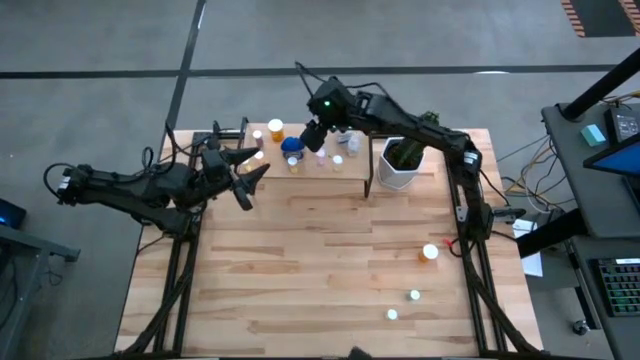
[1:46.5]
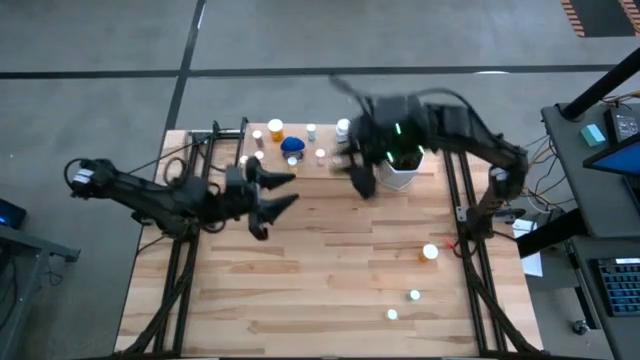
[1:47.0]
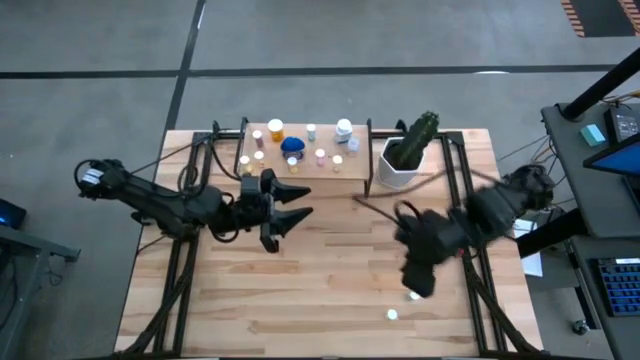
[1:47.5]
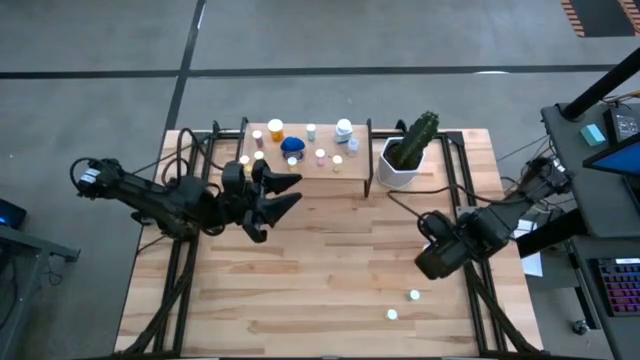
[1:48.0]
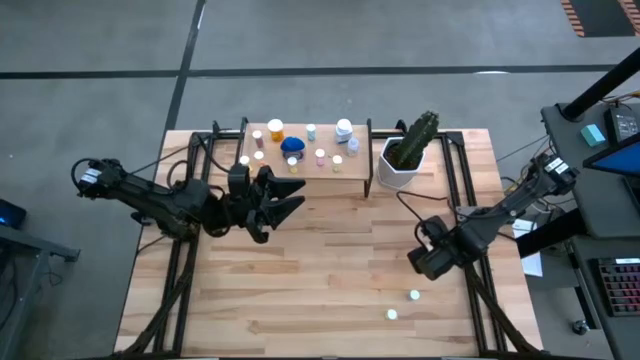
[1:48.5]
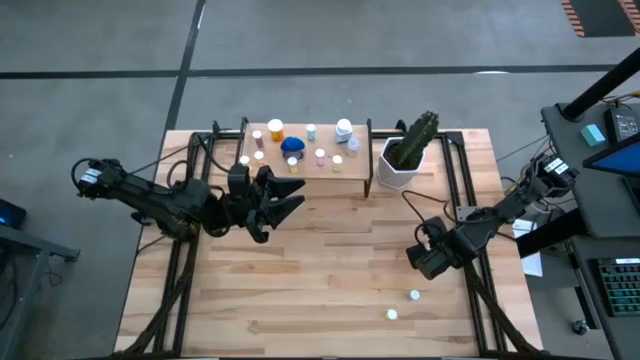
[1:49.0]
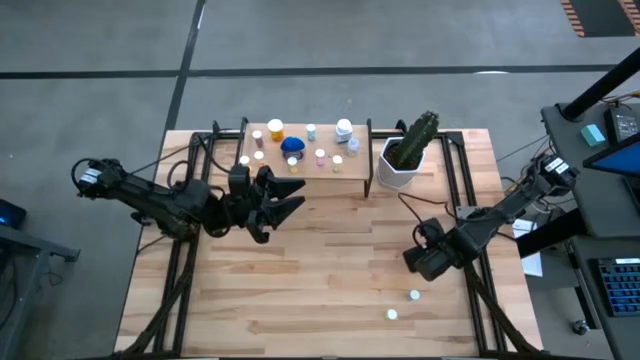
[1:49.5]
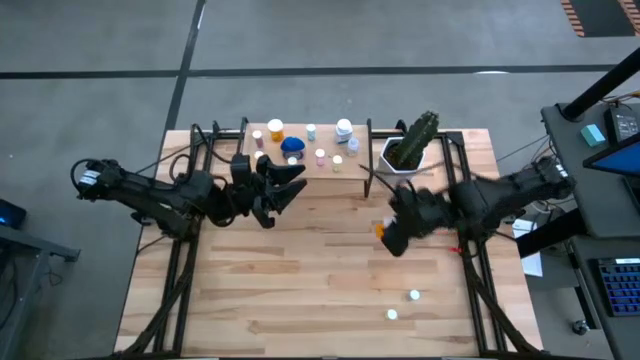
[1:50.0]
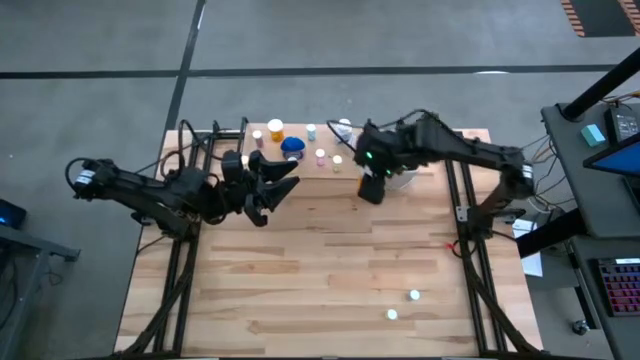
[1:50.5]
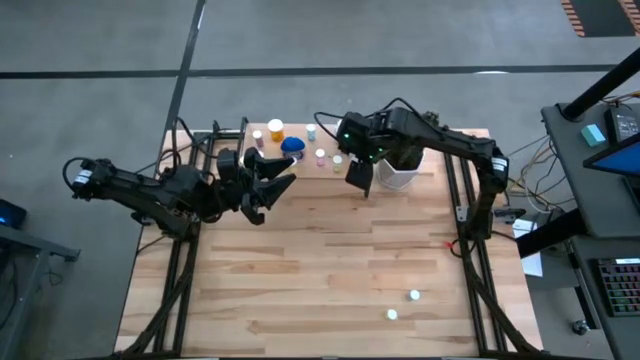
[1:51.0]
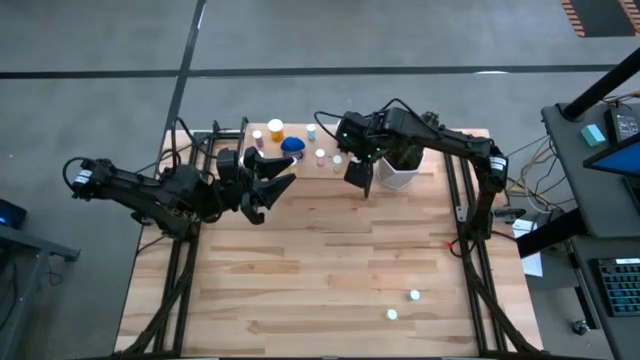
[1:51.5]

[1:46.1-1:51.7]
Task: Pick and place medicine bottles onto shelf by color
Put the orange pill bottle on the shelf

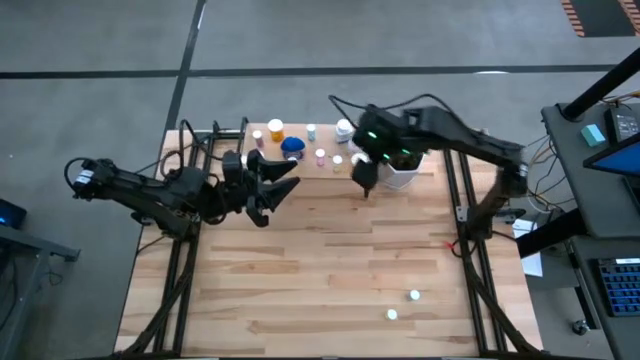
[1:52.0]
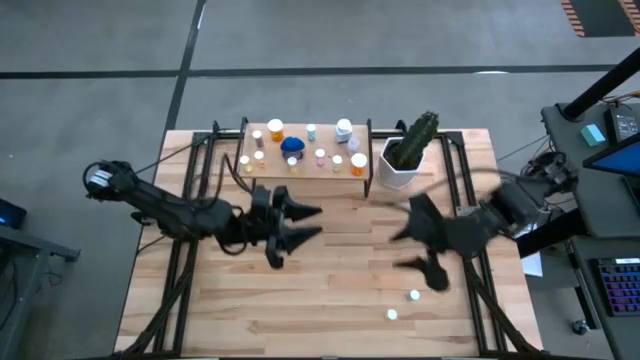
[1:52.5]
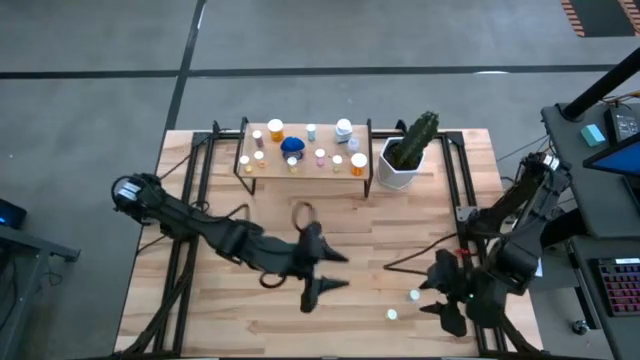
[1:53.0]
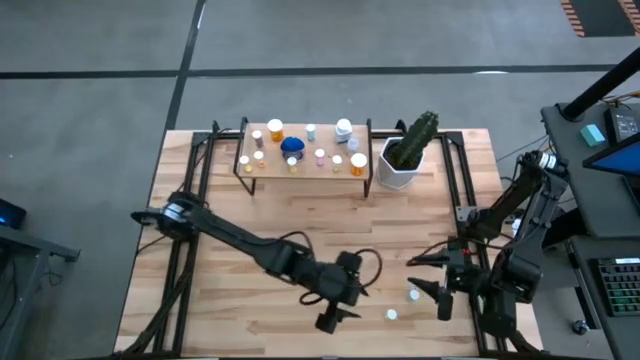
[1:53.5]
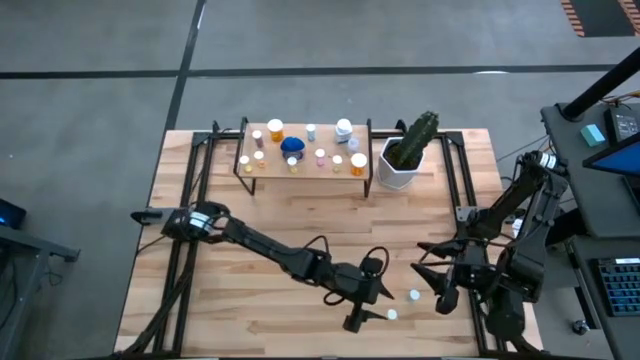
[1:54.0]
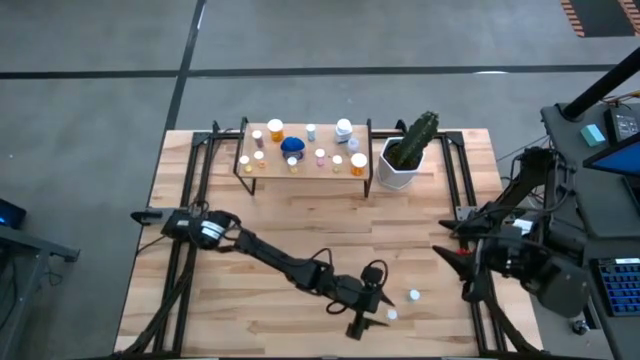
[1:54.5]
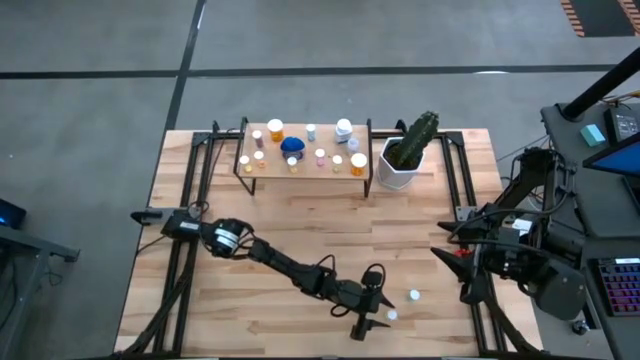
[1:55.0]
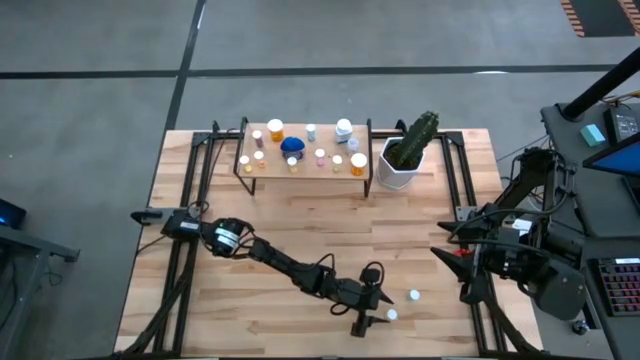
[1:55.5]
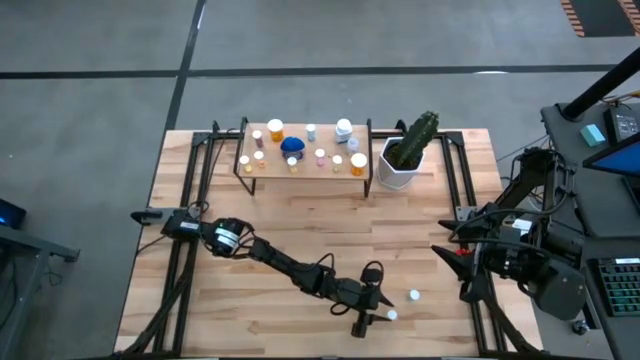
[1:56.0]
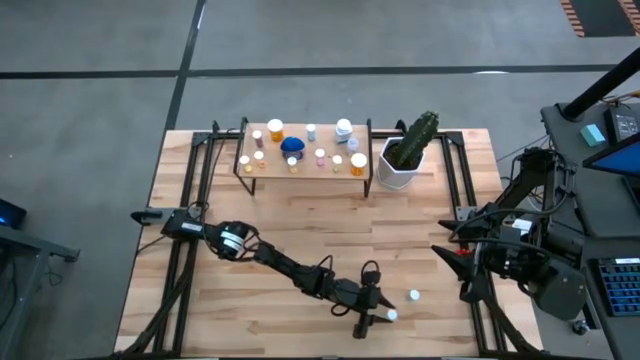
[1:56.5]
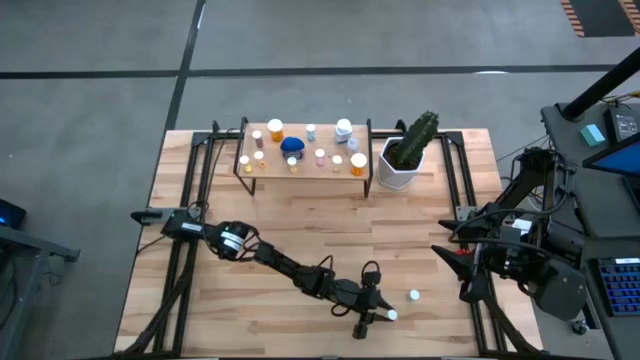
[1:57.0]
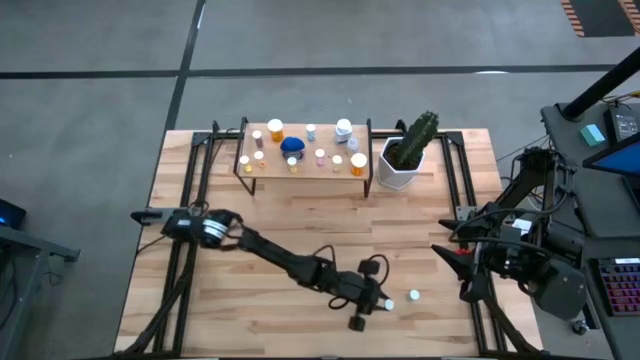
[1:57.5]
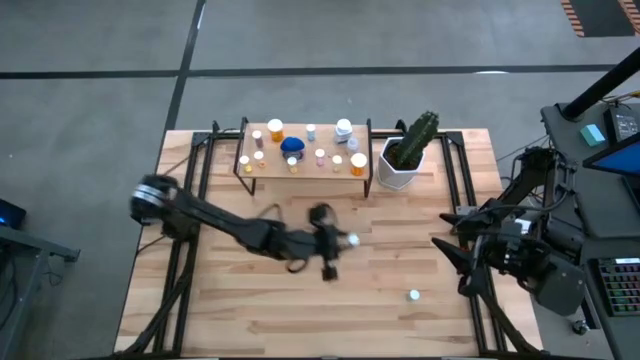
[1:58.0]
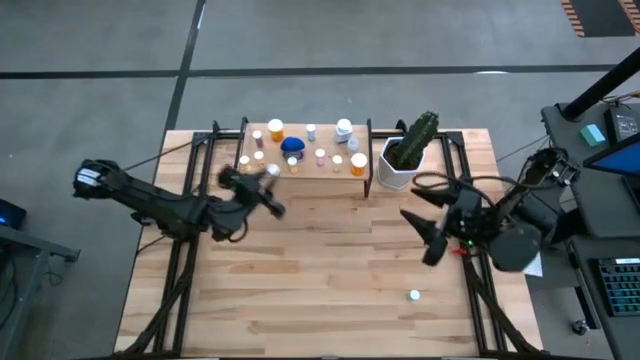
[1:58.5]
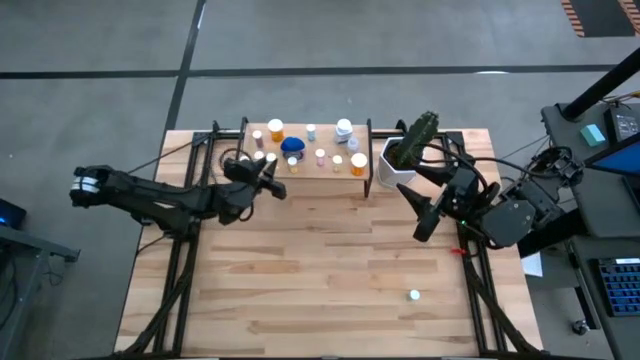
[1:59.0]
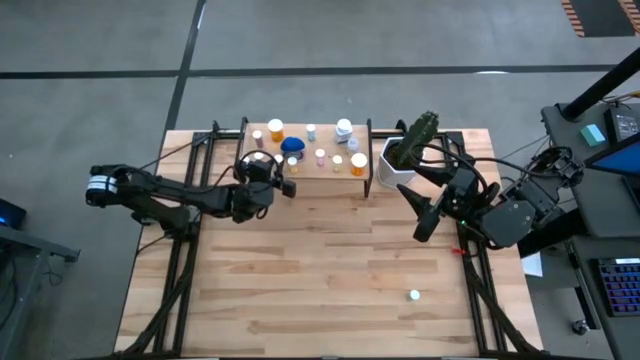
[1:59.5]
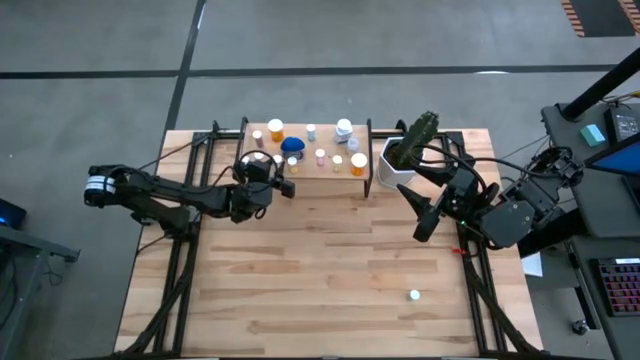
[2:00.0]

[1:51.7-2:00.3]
Put the yellow pill bottle on the shelf

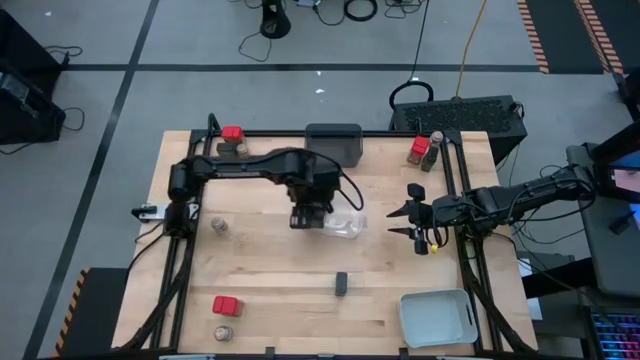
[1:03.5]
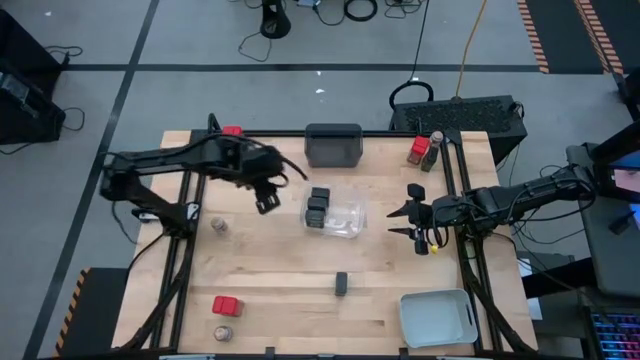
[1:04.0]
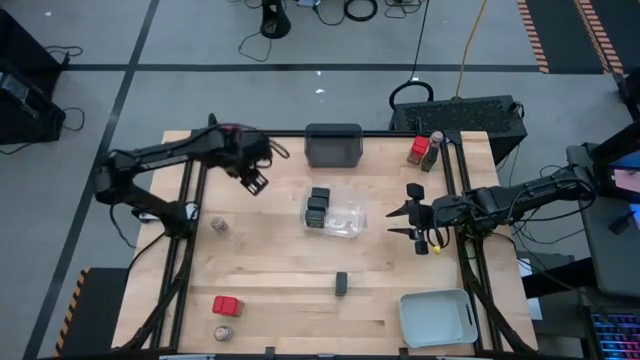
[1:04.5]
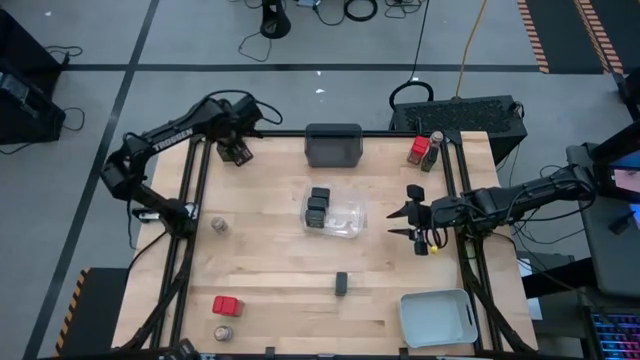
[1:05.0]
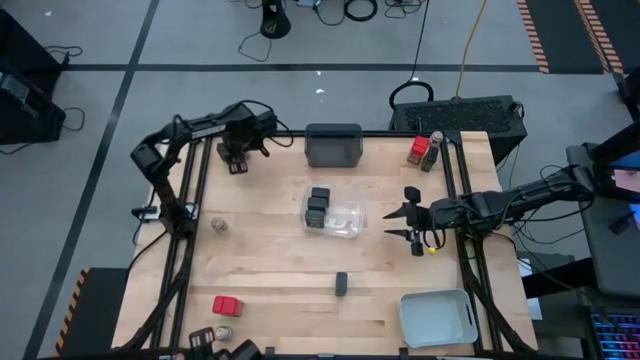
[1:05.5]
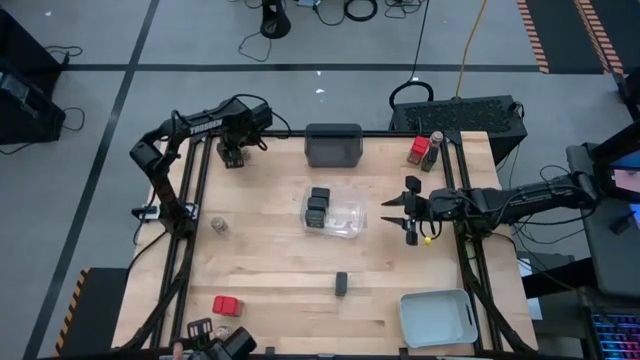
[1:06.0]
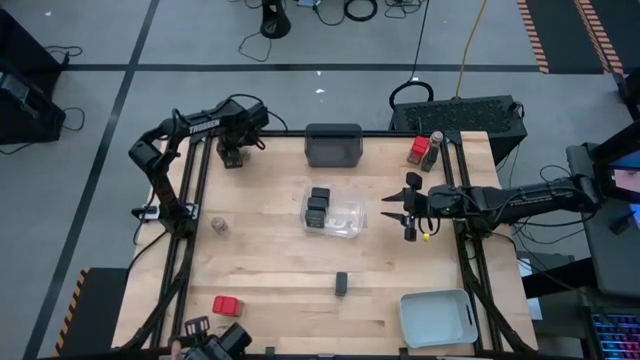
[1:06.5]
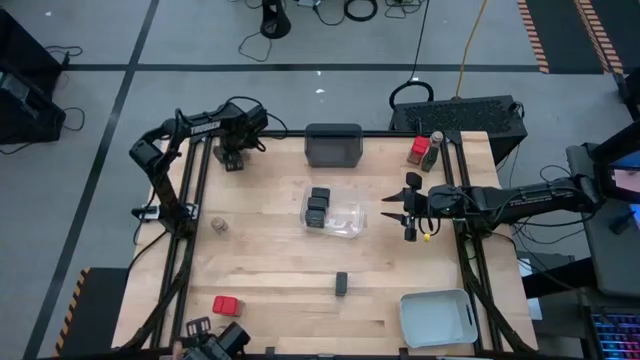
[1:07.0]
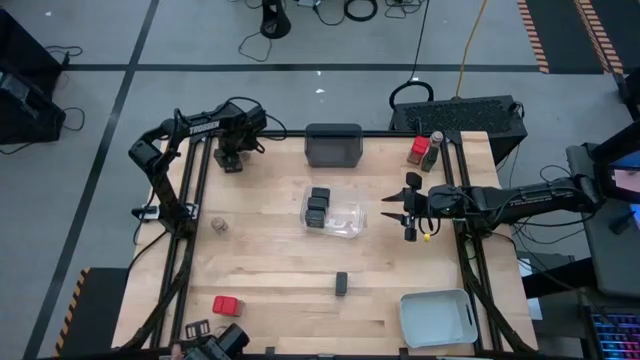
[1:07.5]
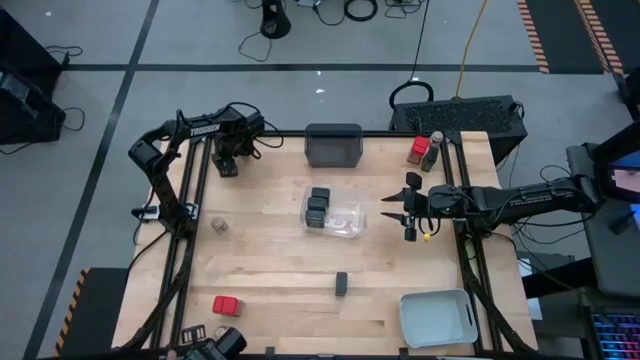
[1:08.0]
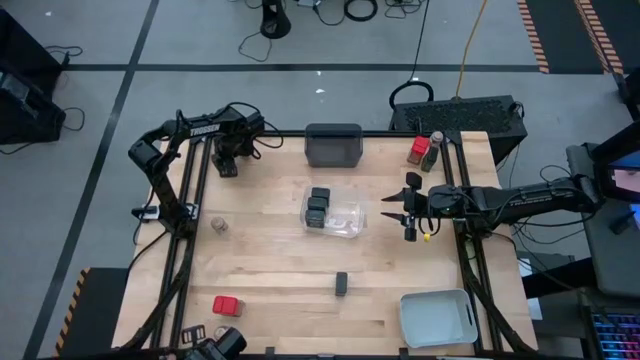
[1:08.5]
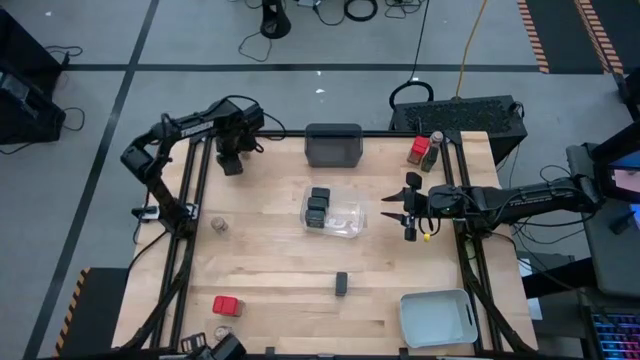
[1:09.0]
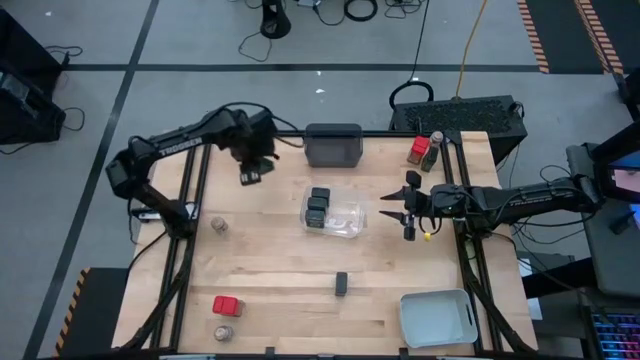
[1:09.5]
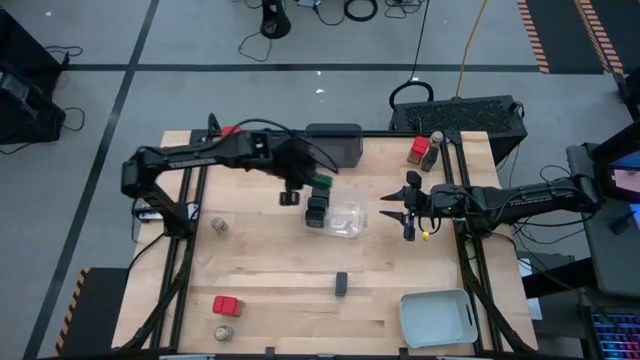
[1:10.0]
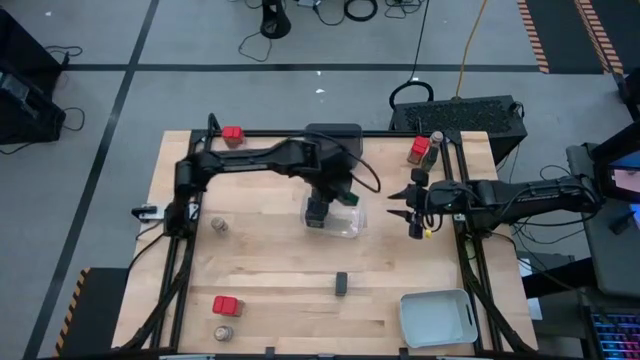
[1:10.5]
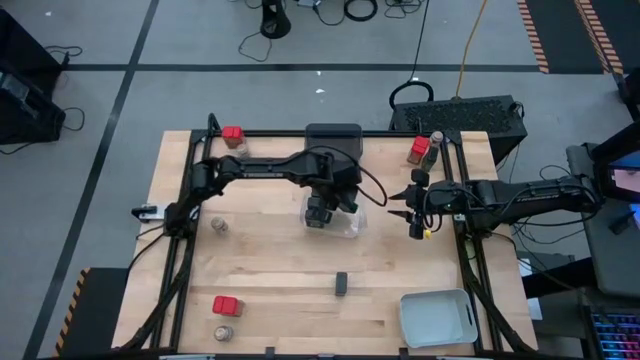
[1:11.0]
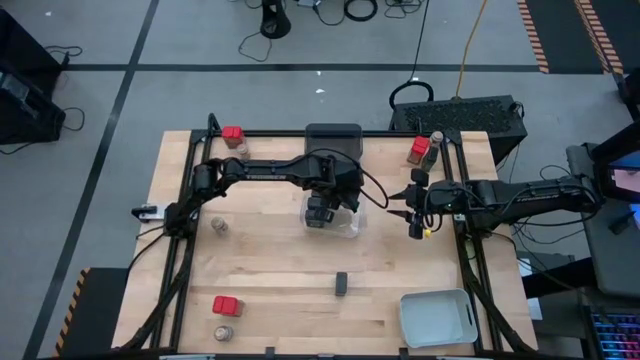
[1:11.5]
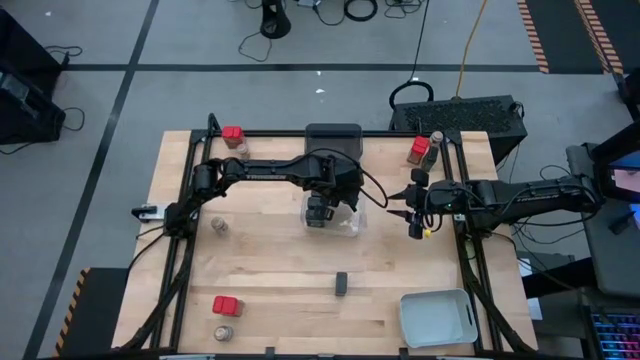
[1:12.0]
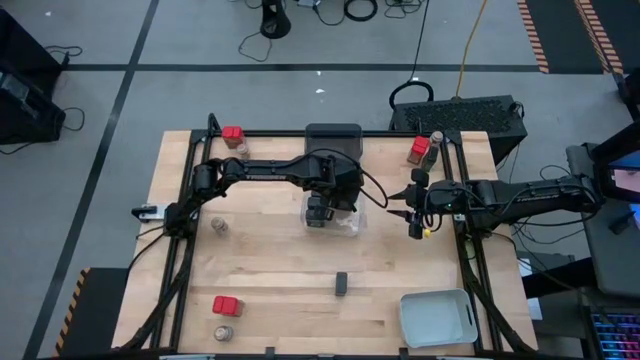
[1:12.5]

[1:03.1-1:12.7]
Task: Sort spices by type
Put the green seasoning into the transparent bin
